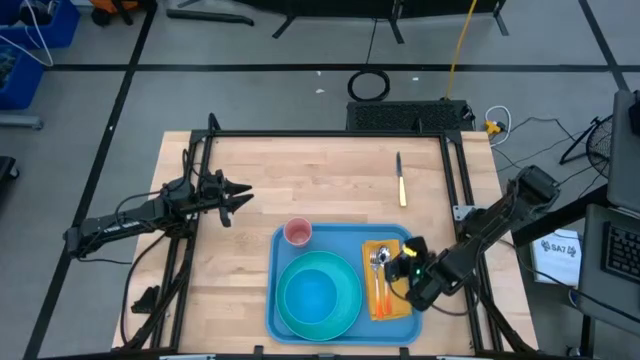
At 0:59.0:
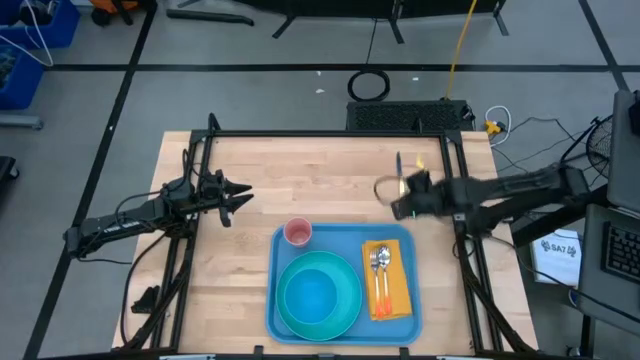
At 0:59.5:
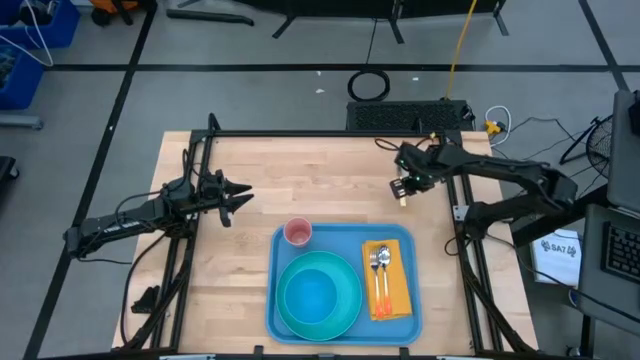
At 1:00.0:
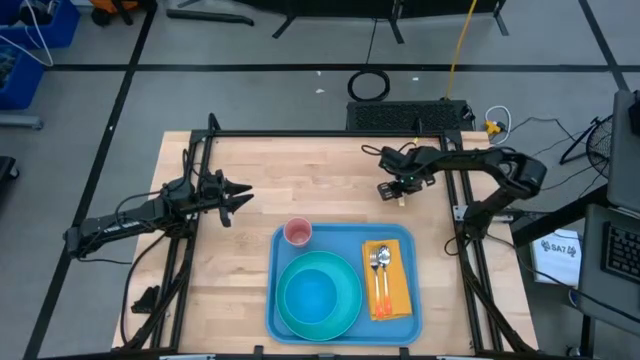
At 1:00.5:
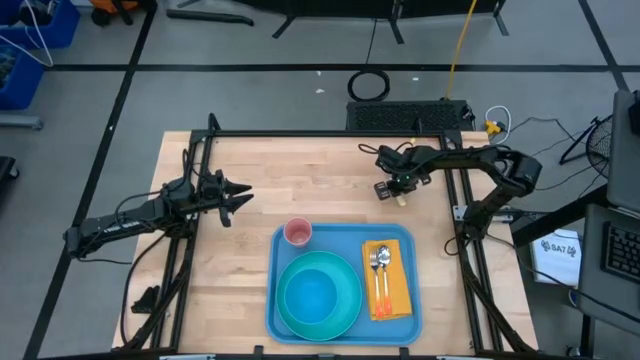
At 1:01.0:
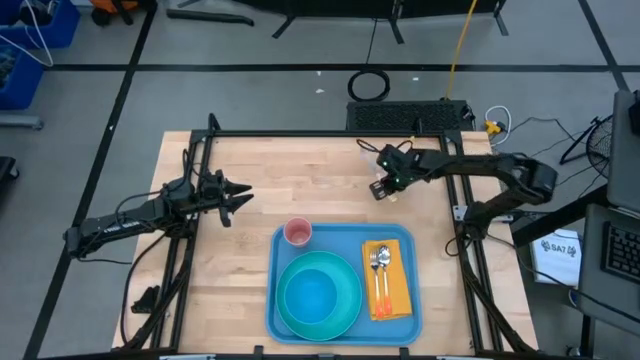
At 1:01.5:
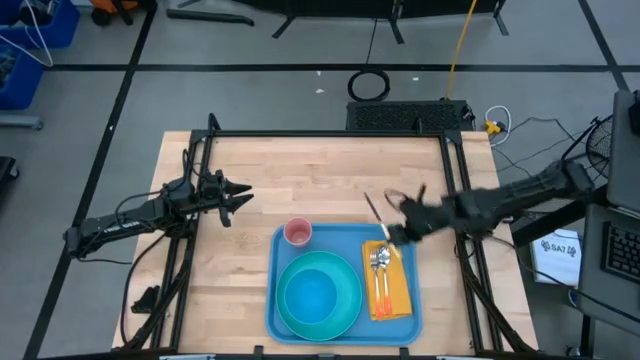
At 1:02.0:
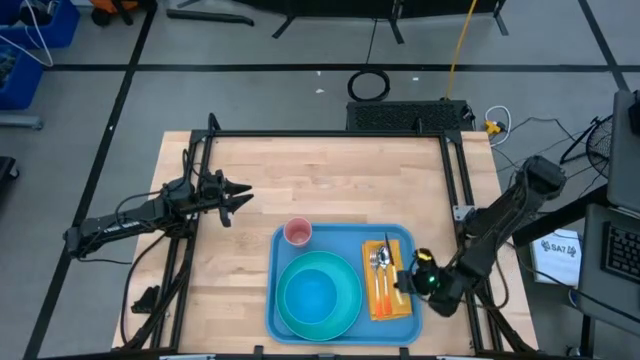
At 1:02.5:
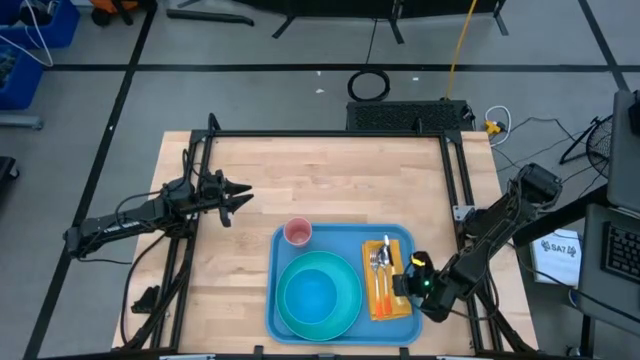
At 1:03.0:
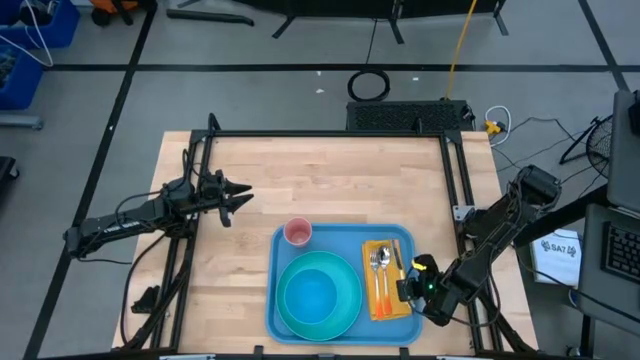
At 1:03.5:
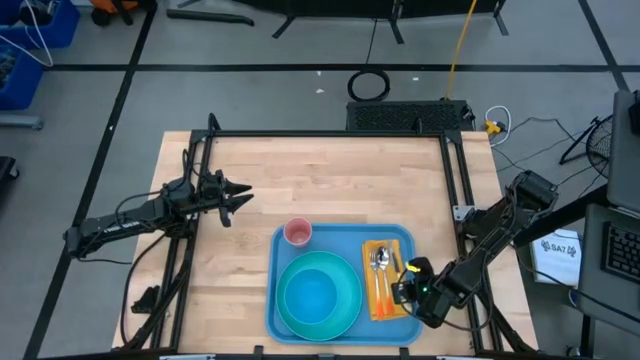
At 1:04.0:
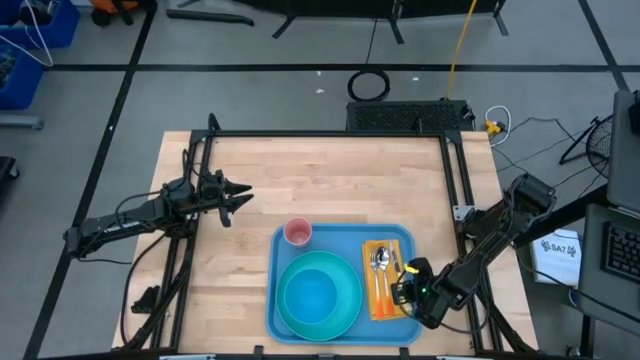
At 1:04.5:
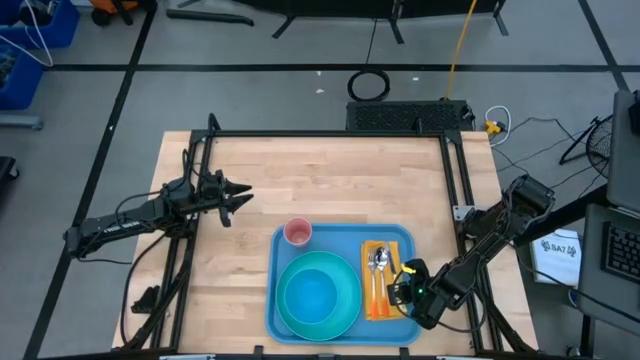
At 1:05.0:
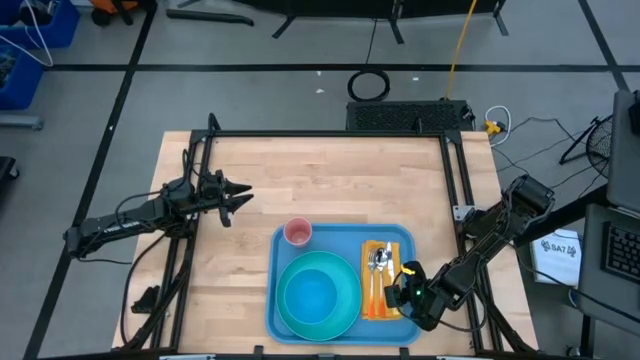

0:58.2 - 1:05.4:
Task: Set up tray
Put the yellow knife on the yellow napkin

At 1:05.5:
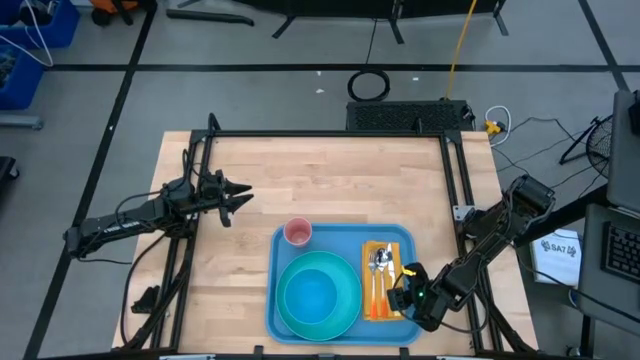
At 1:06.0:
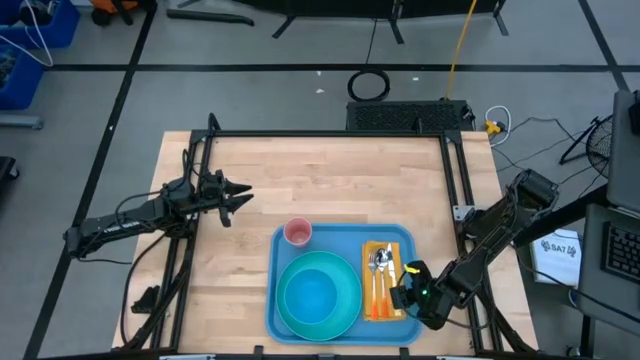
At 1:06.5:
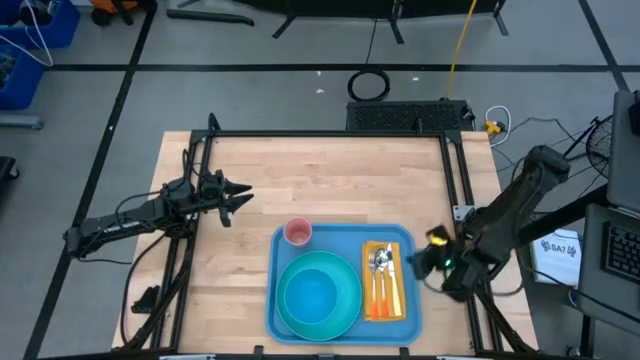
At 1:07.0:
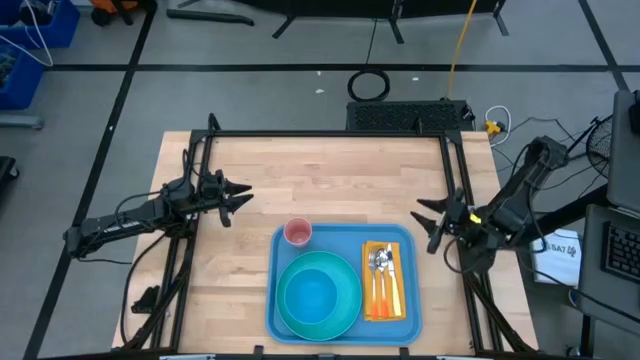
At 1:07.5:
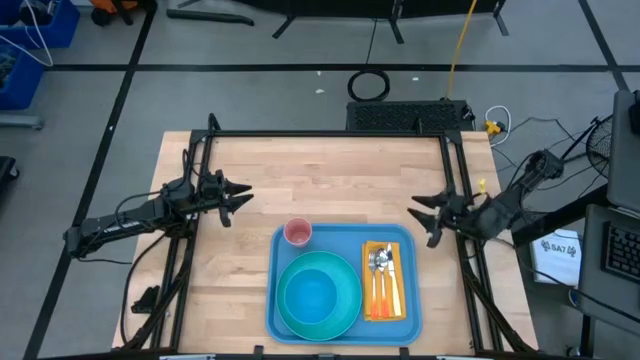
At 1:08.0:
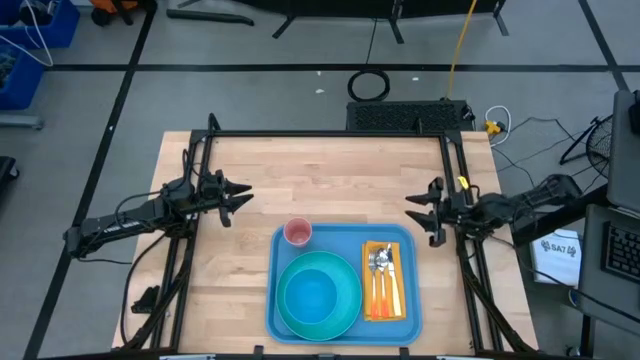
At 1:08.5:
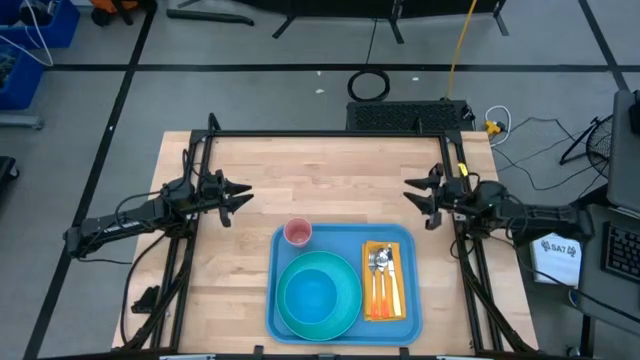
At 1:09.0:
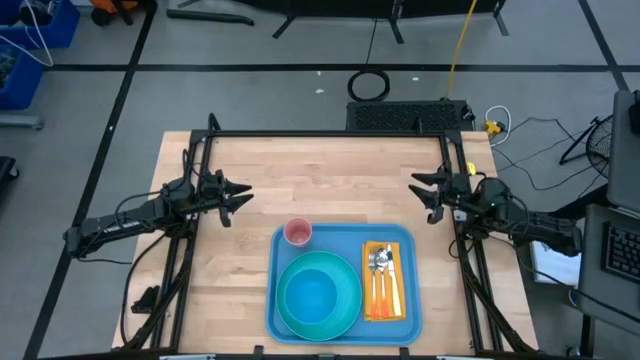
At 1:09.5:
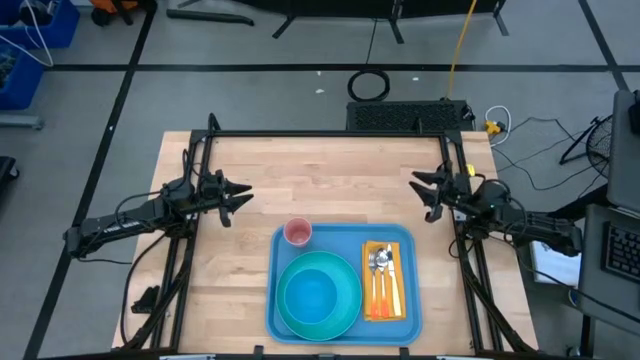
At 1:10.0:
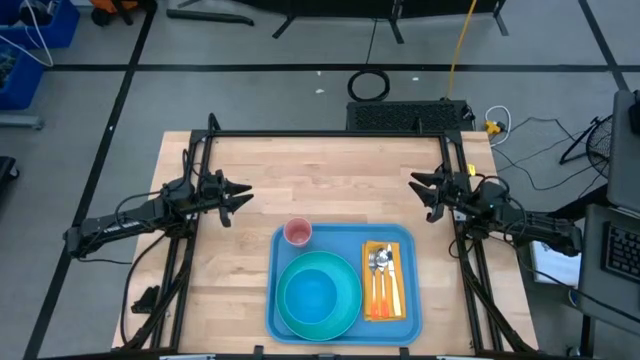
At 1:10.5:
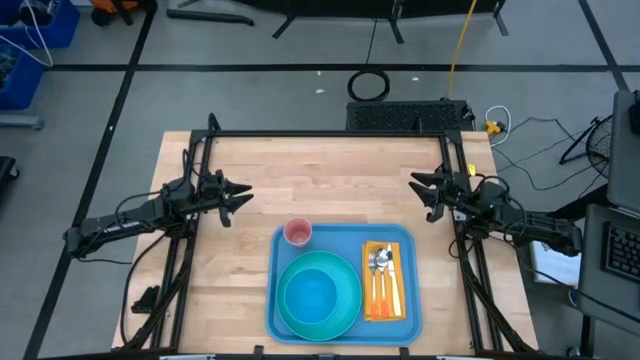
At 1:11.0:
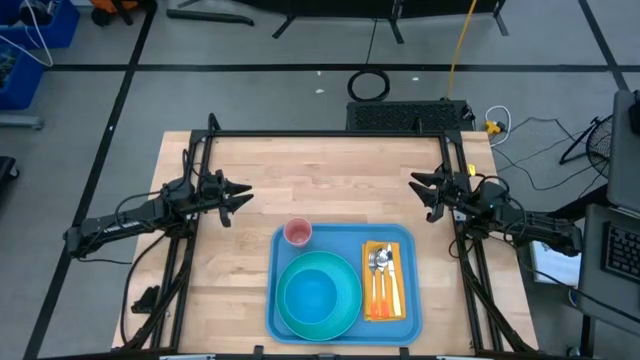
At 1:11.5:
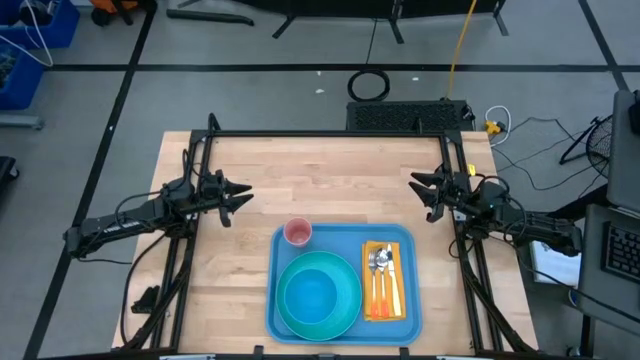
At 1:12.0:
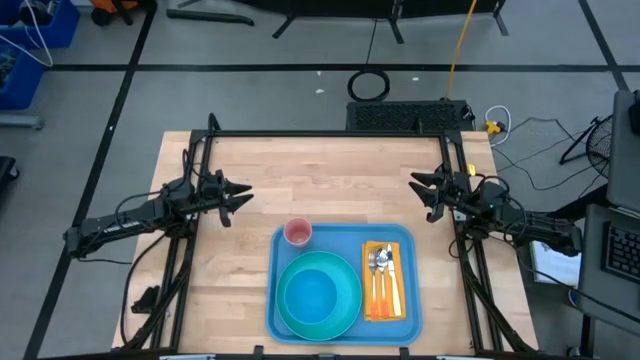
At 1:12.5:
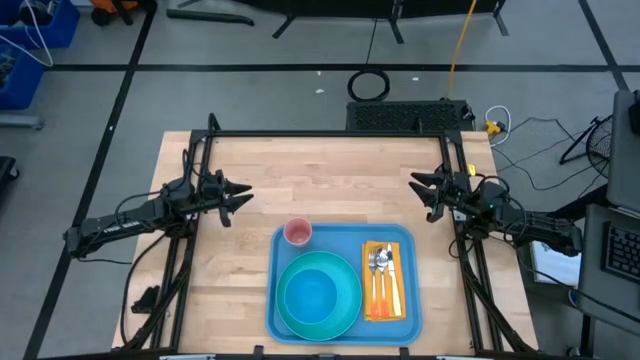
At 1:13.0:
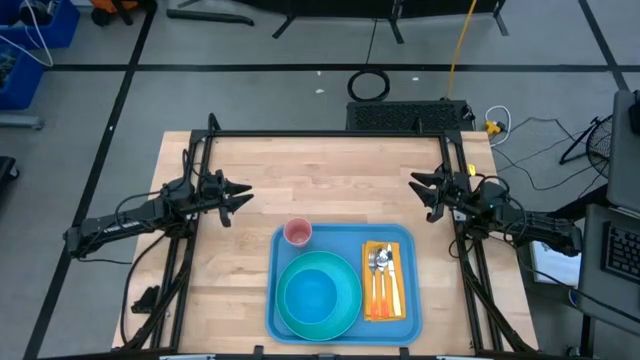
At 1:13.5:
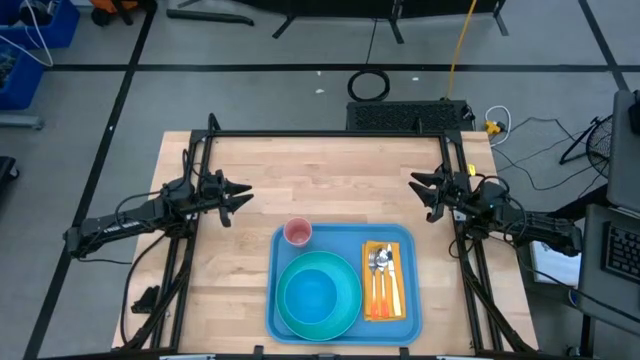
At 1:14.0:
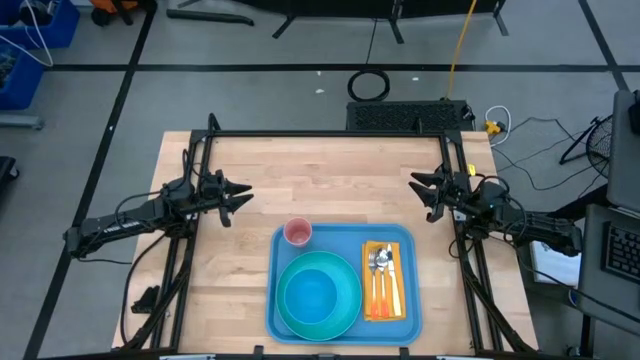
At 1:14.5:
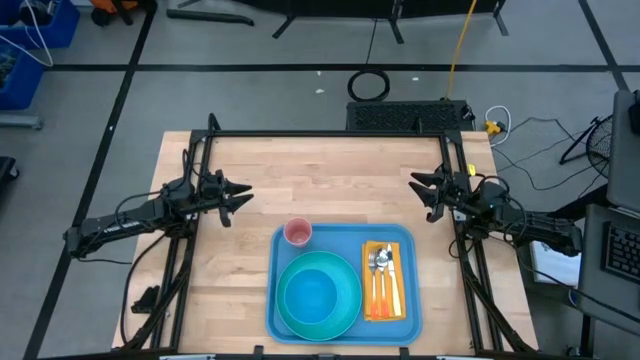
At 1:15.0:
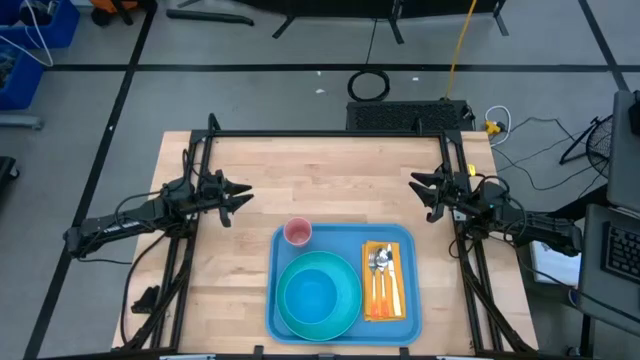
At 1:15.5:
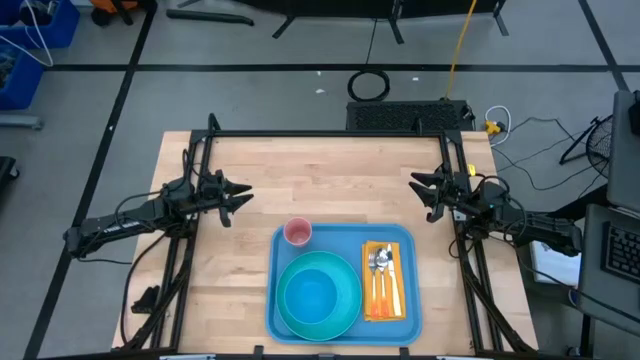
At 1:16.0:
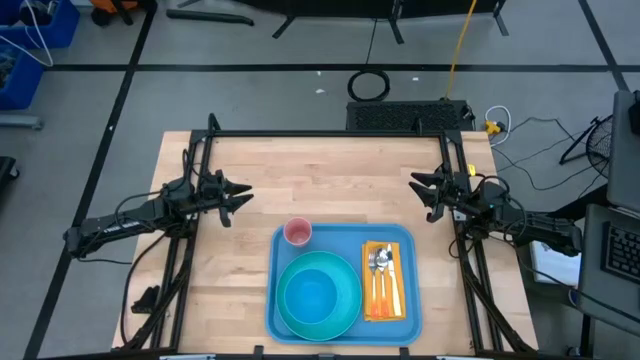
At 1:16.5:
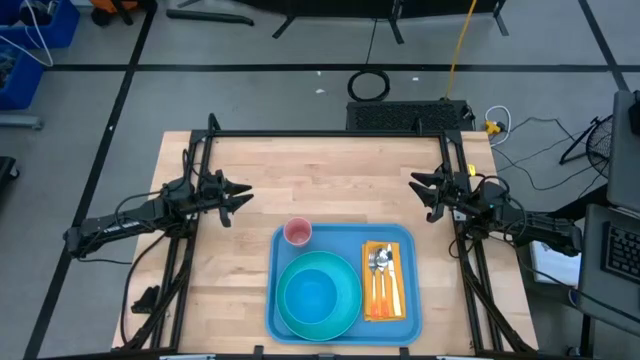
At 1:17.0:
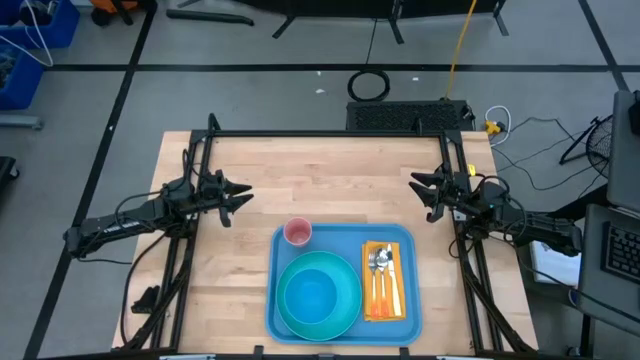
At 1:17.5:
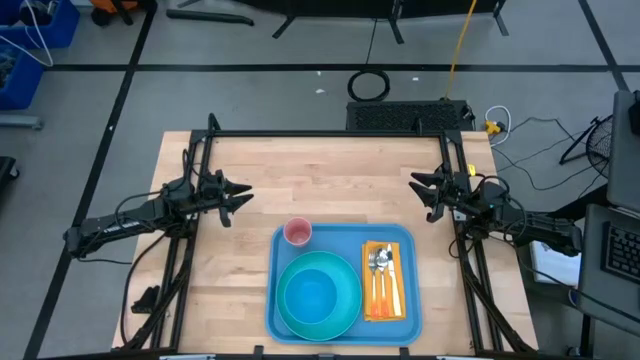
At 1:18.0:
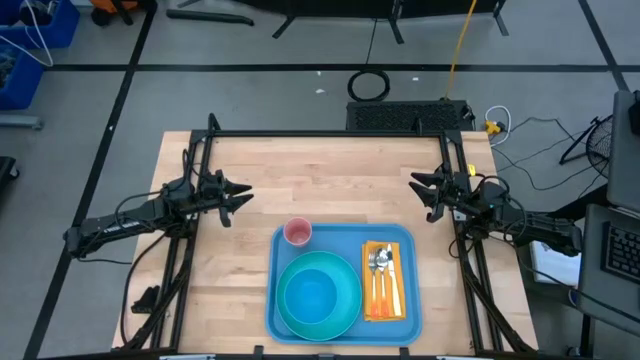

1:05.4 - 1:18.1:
Return to Home Position

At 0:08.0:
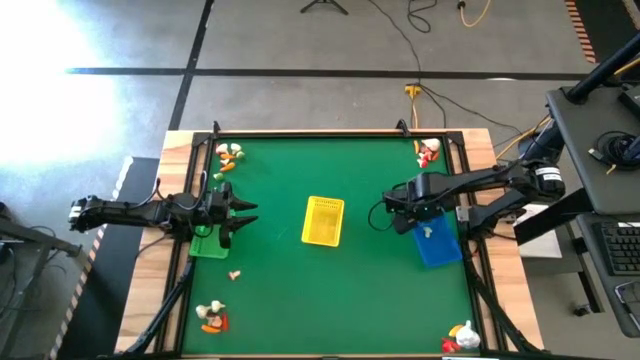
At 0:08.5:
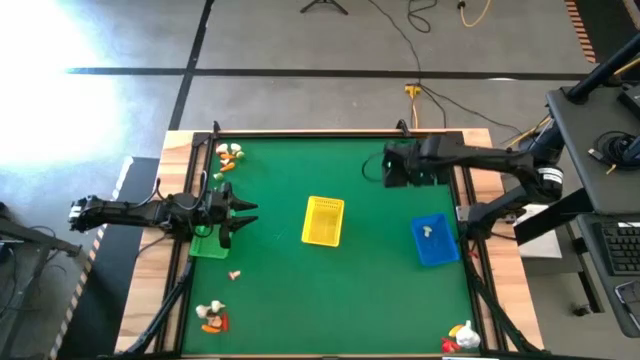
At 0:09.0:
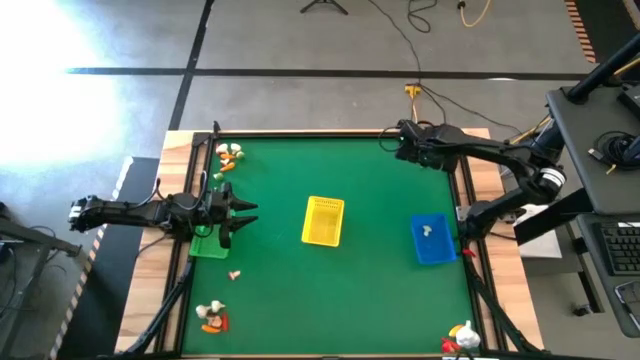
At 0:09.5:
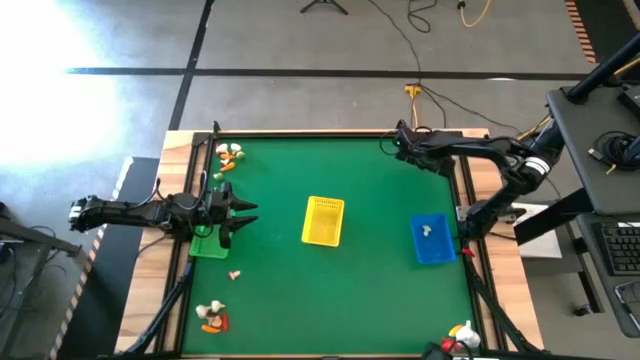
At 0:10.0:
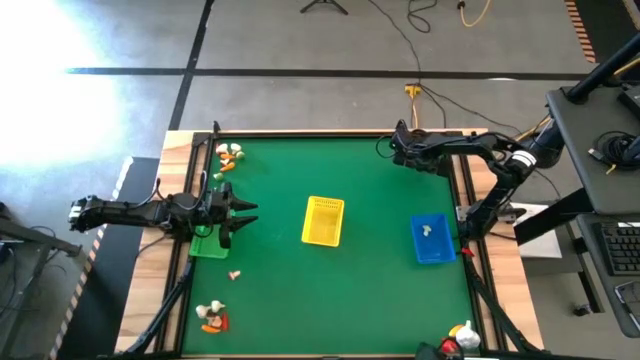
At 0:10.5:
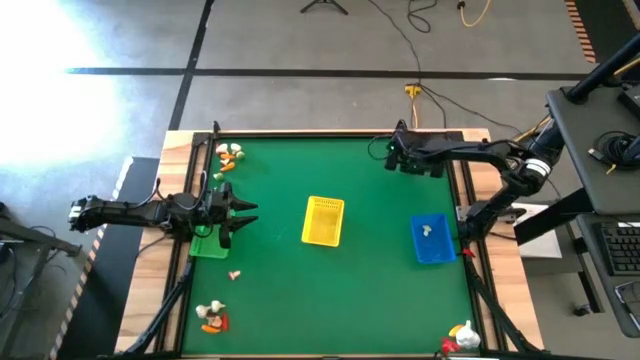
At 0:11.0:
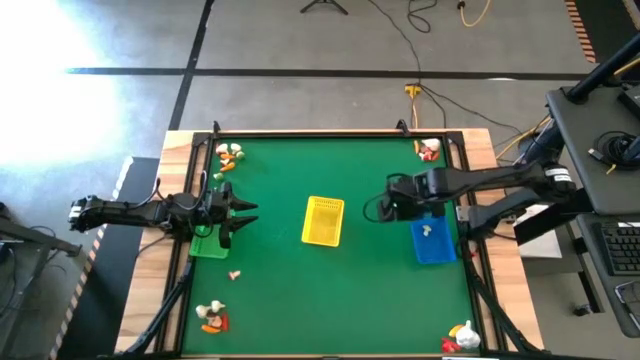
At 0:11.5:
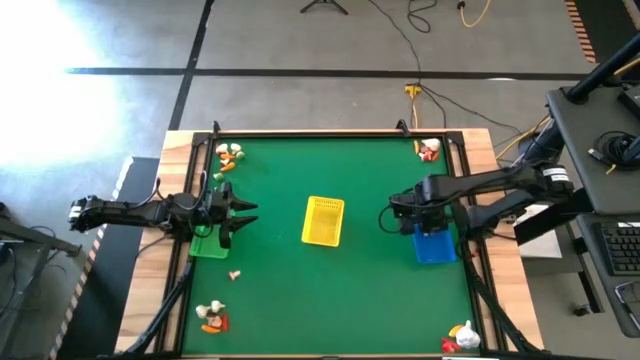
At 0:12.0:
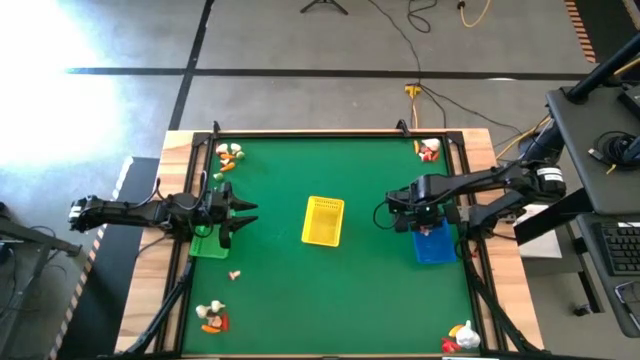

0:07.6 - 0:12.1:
Task: Sort produce into baskets
Put the red mushroom into the blue bin
